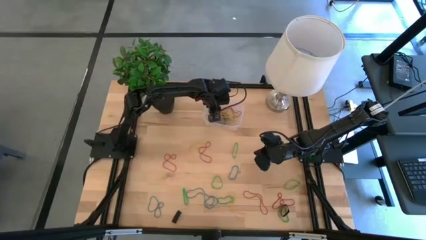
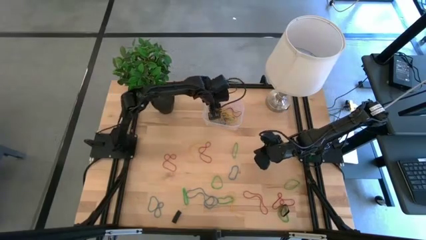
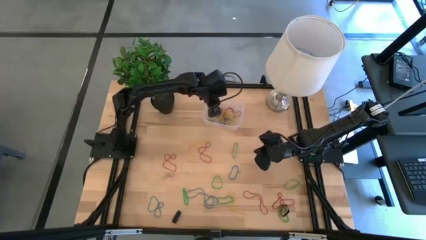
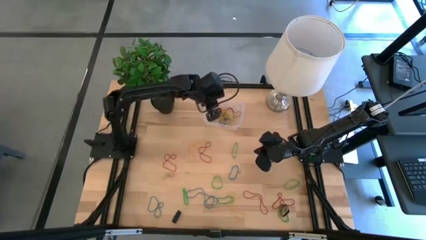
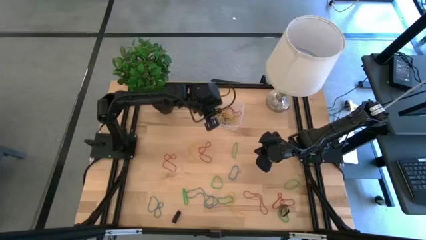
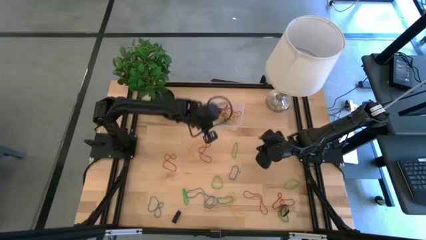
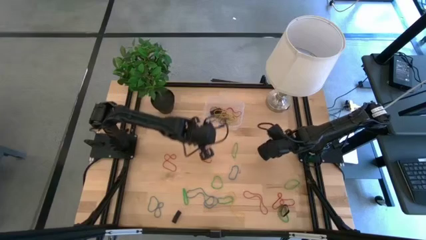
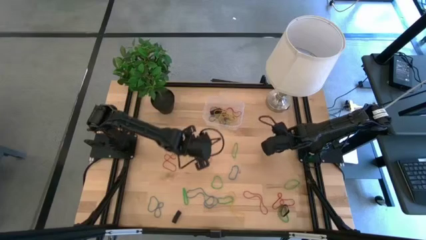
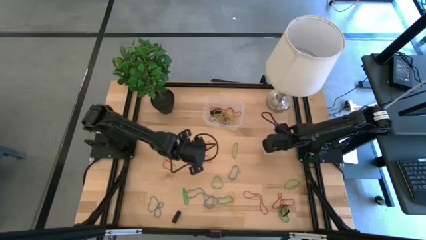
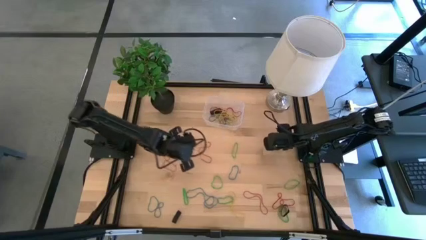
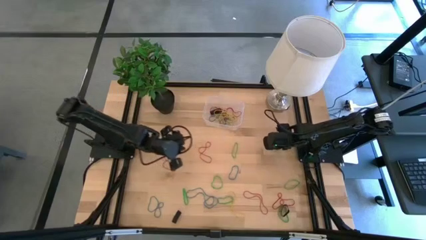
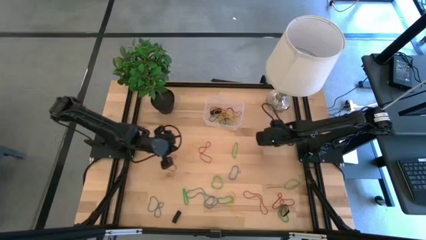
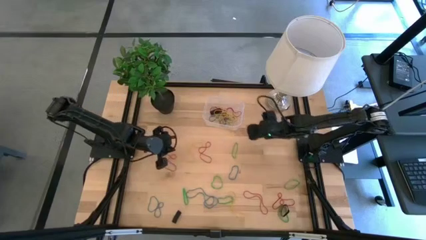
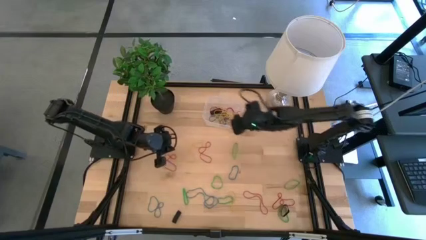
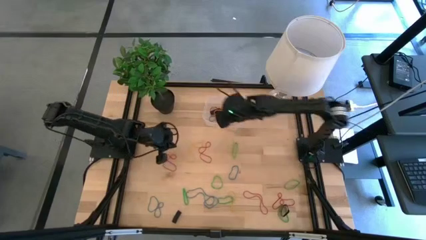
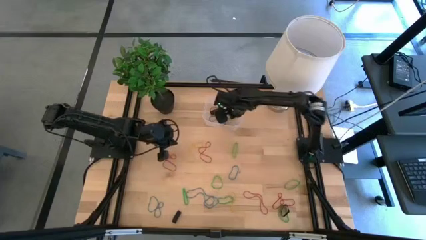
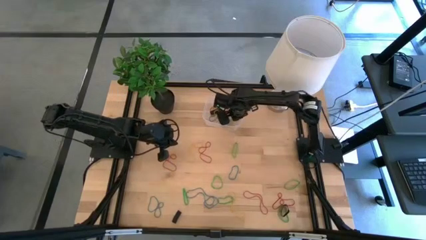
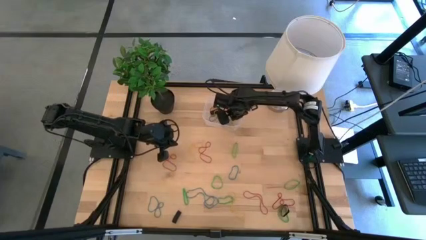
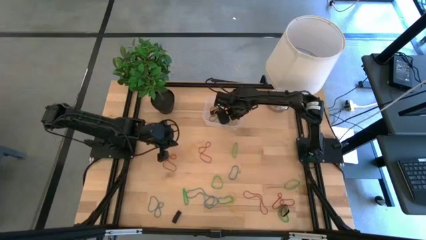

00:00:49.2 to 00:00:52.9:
Task: Pick and place rubber bands into bin
Put the black rubber band into the transparent bin

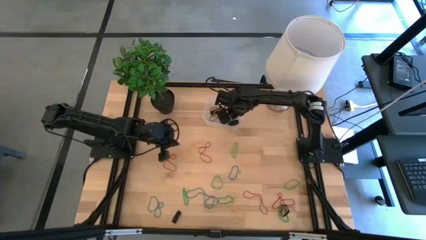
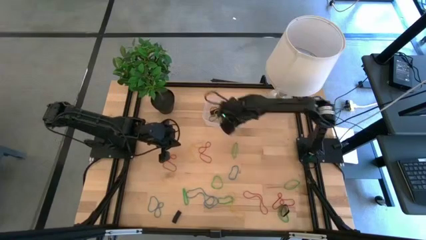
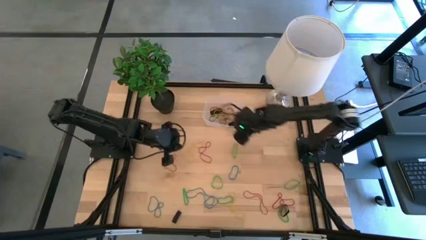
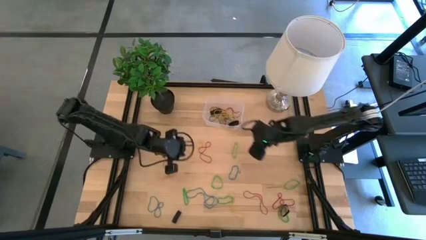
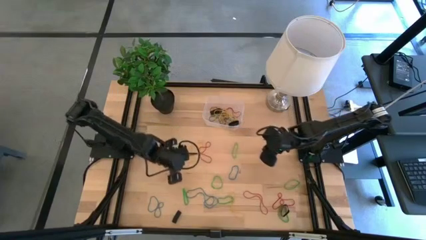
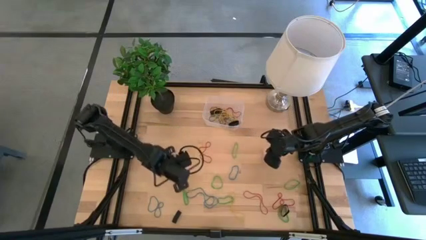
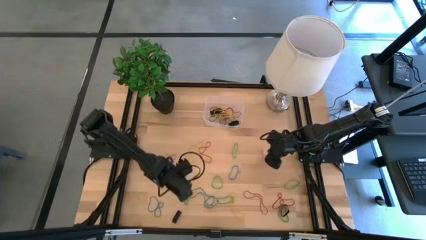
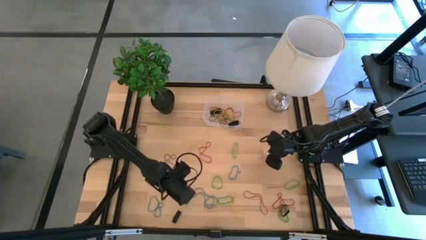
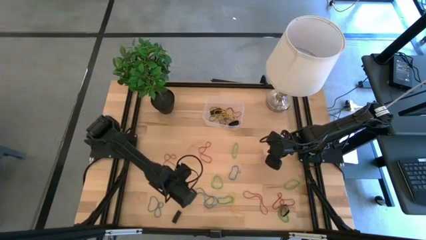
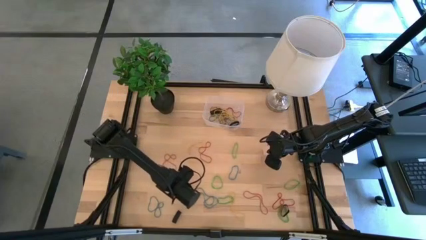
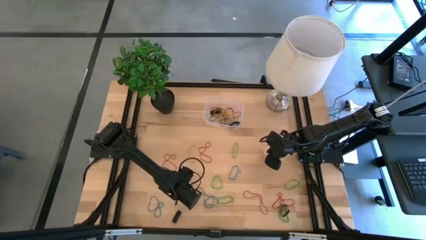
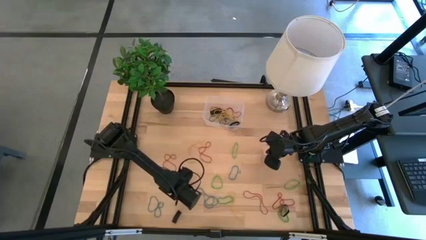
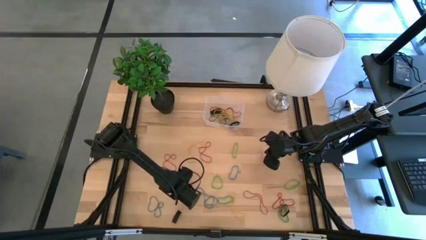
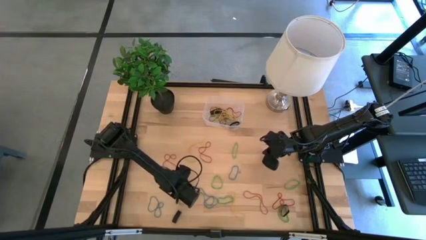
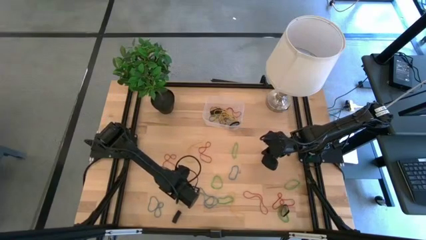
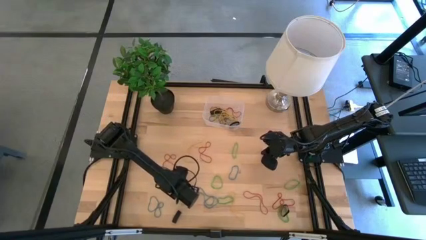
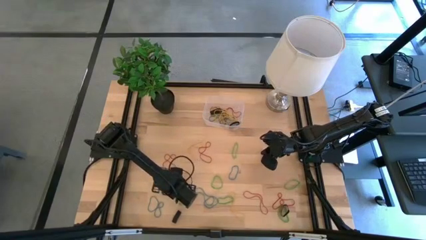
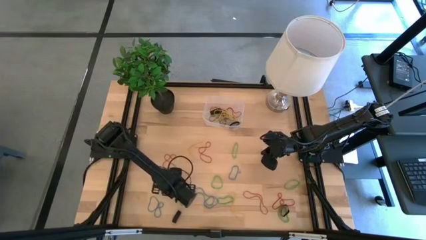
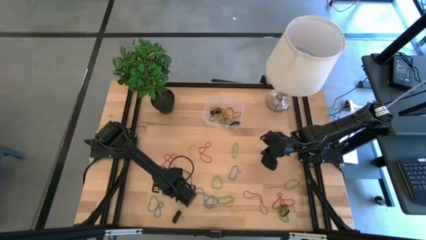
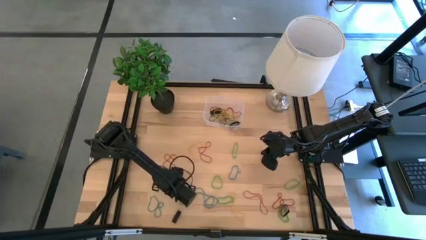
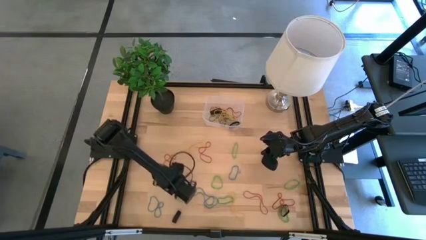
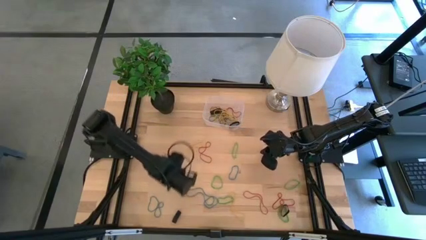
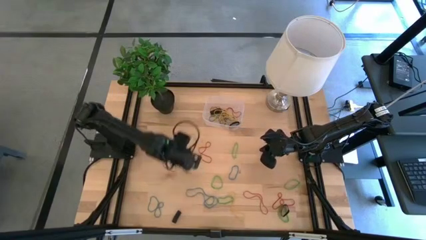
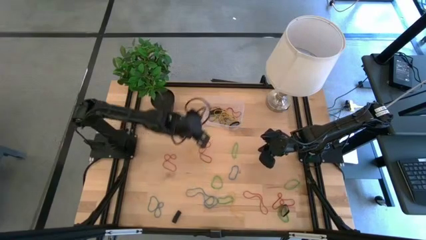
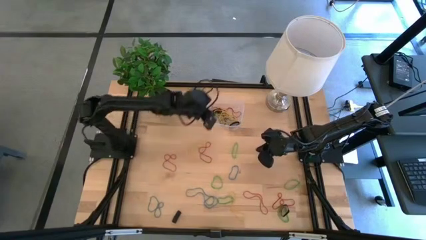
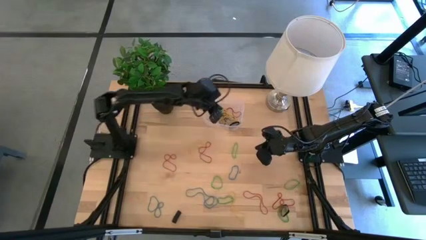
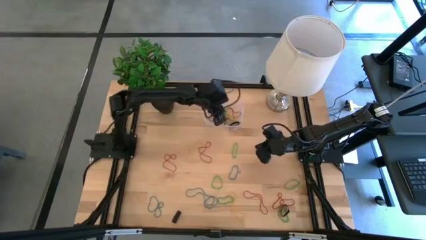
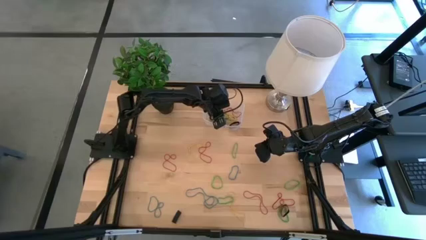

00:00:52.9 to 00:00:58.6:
Put the green rubber band into the transparent bin

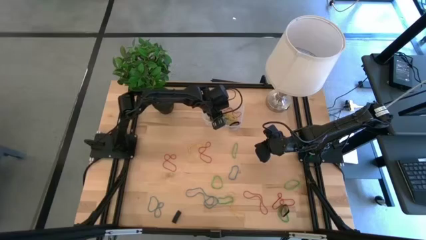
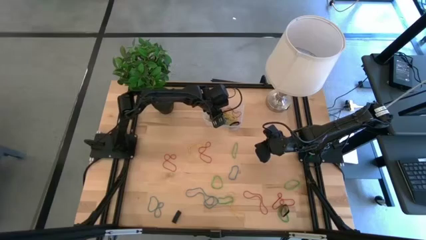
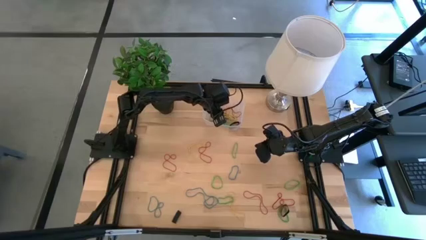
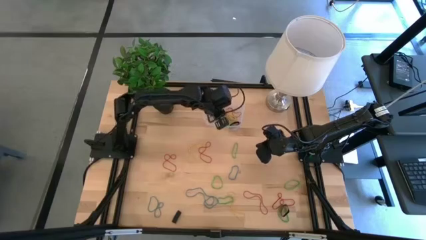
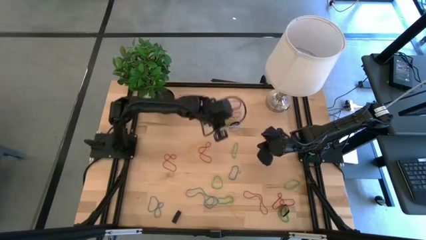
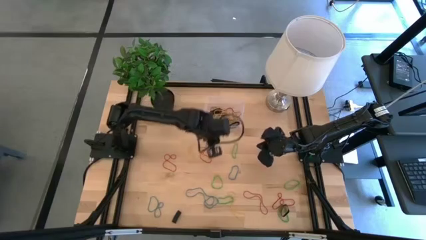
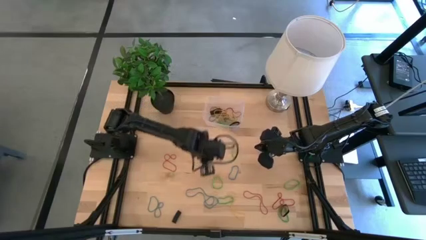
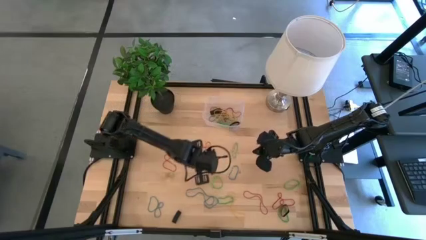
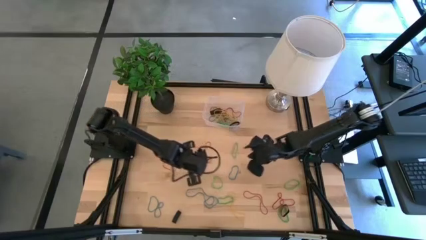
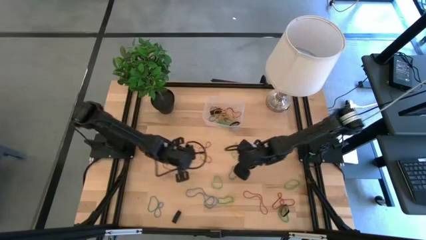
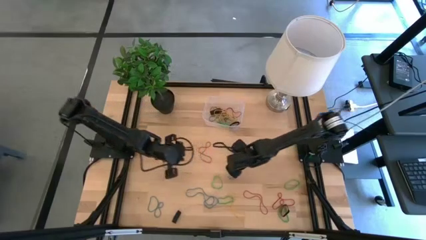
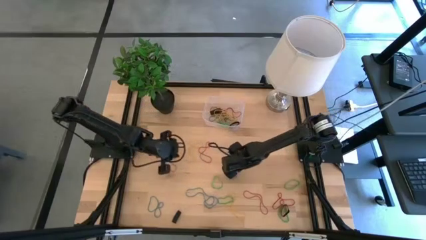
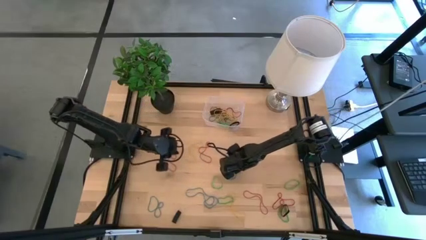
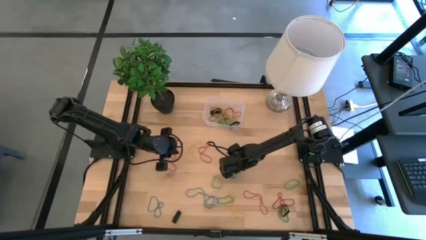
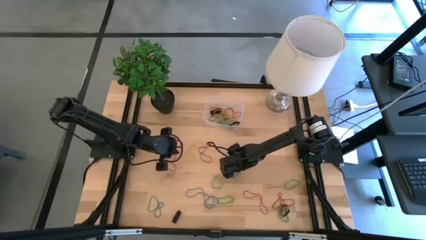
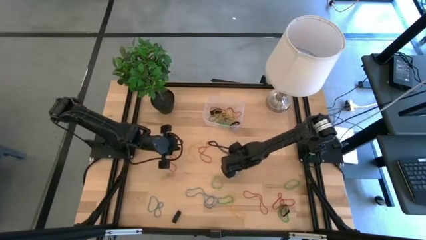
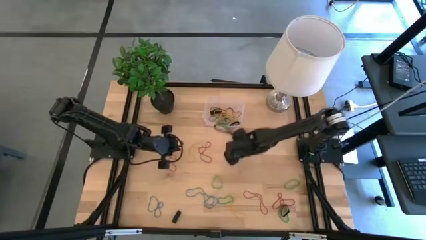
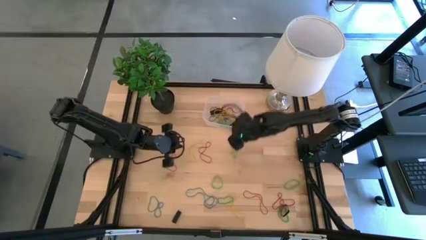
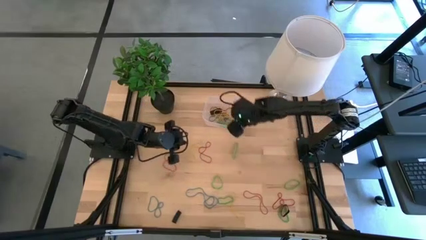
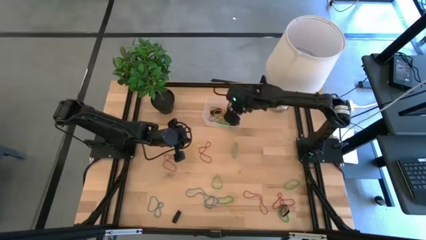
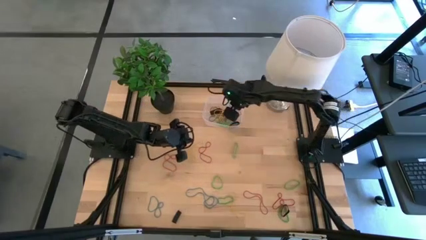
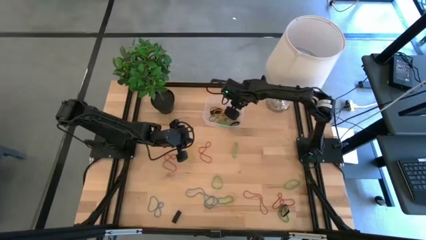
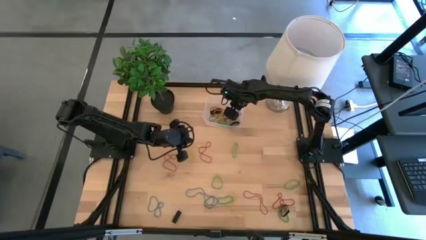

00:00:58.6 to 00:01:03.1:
Put the blue rubber band into the transparent bin

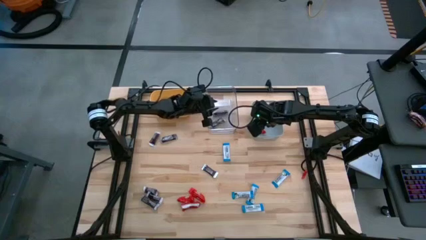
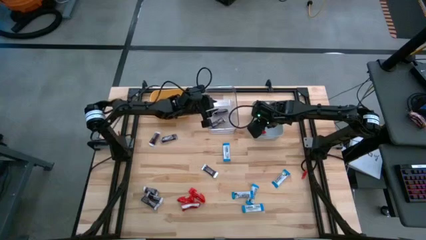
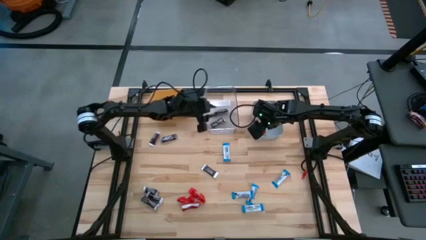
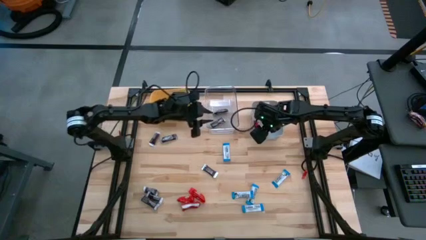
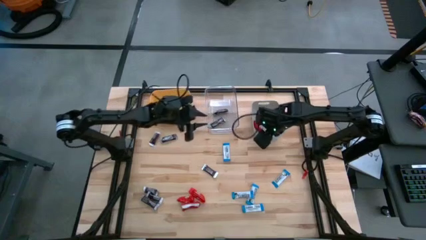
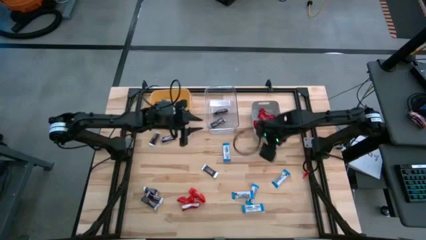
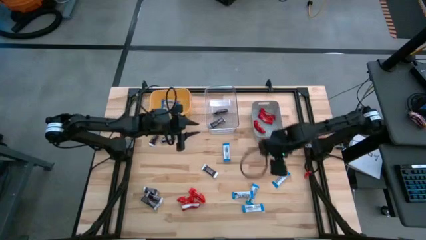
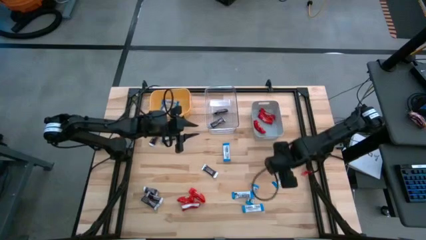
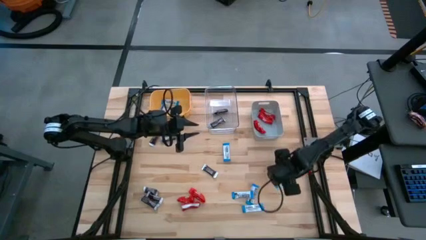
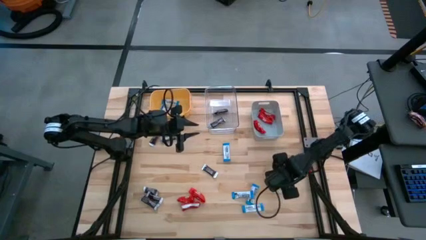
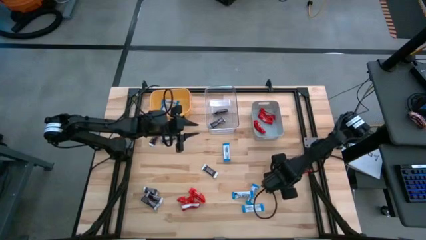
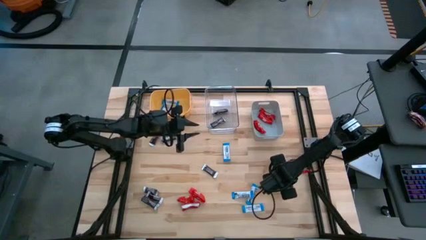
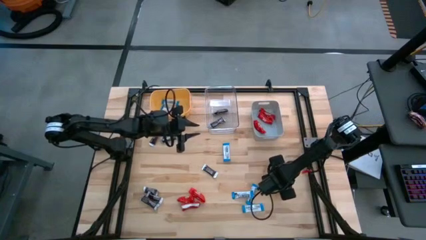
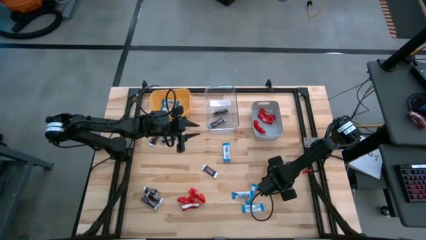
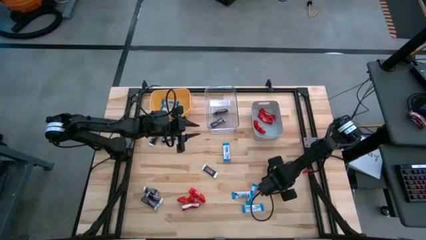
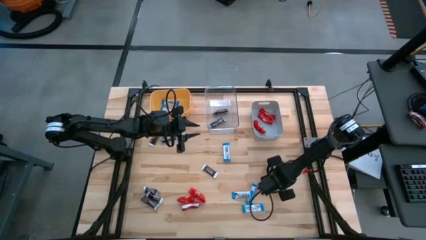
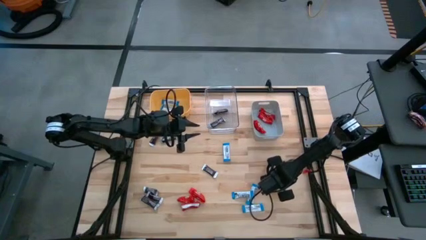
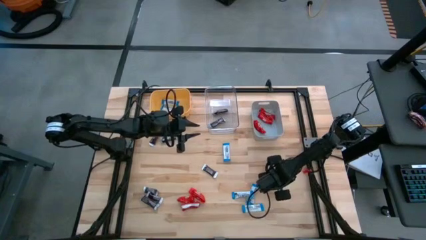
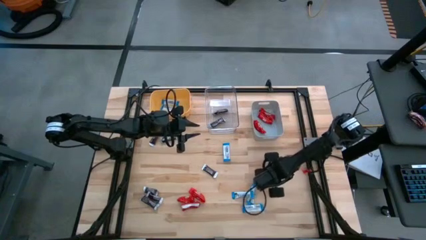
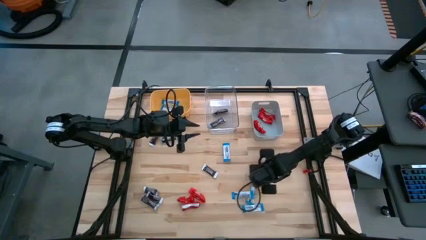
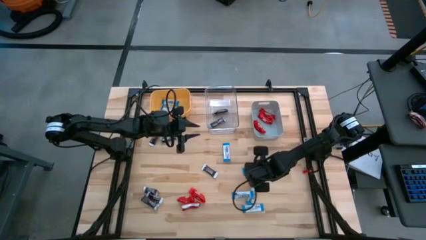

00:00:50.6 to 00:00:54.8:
Task: Sort candy
Put the white chocolate into the yellow bin
